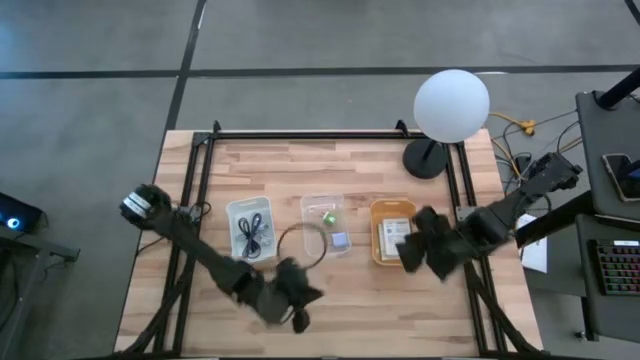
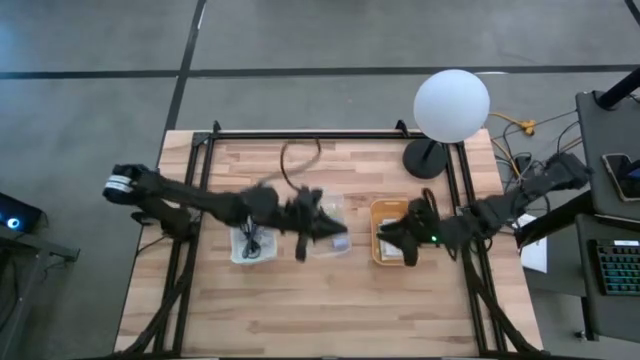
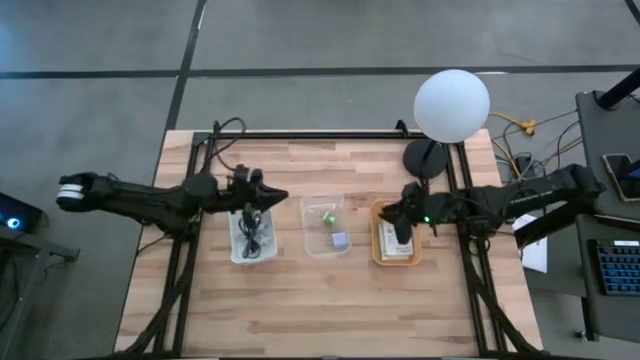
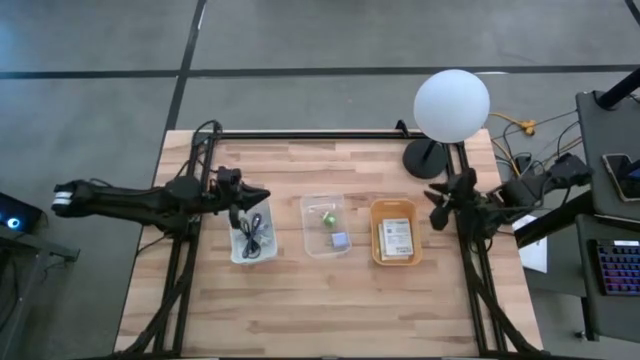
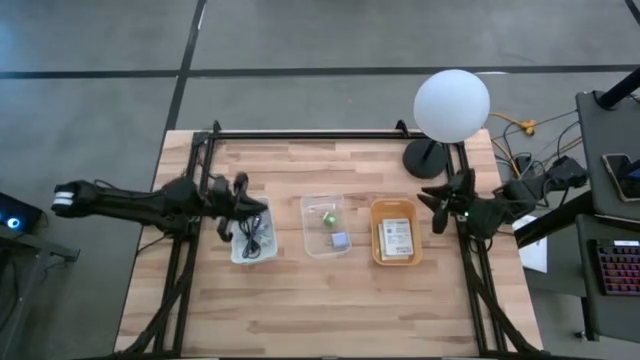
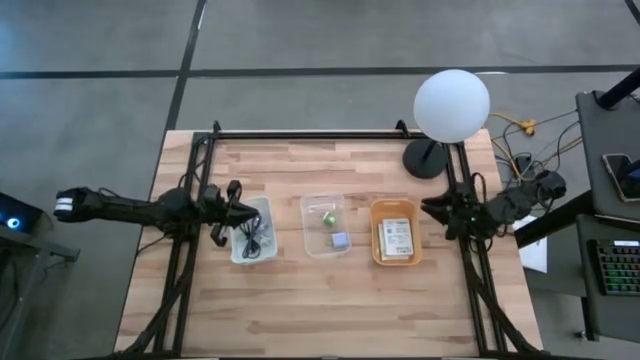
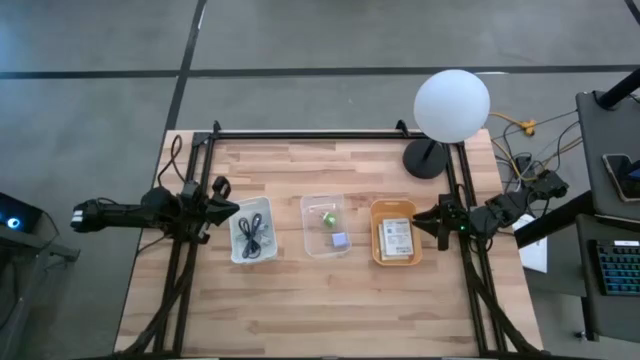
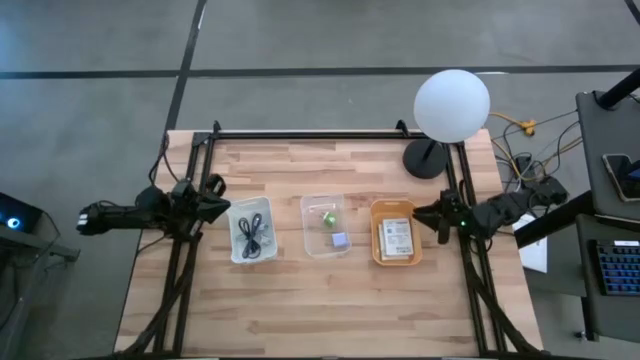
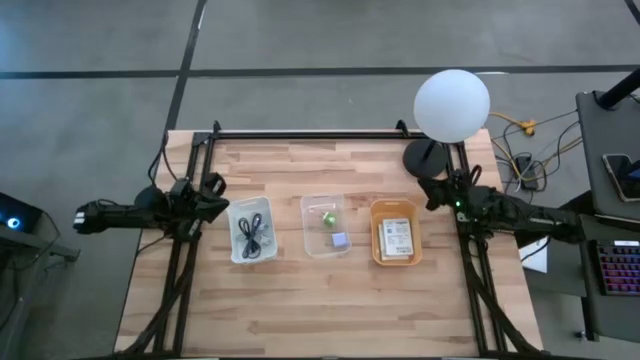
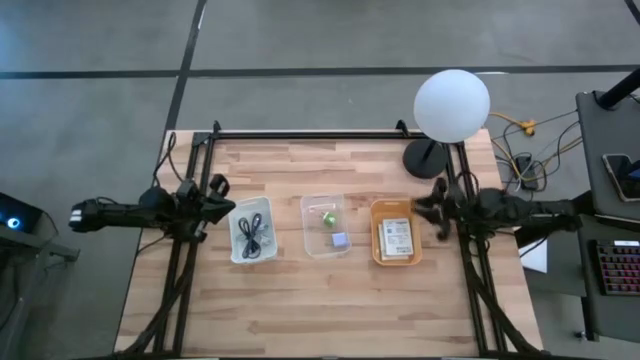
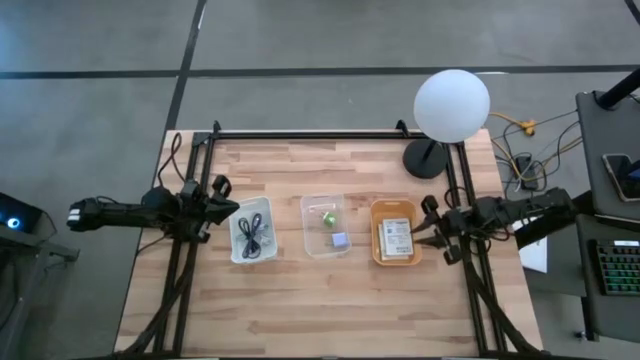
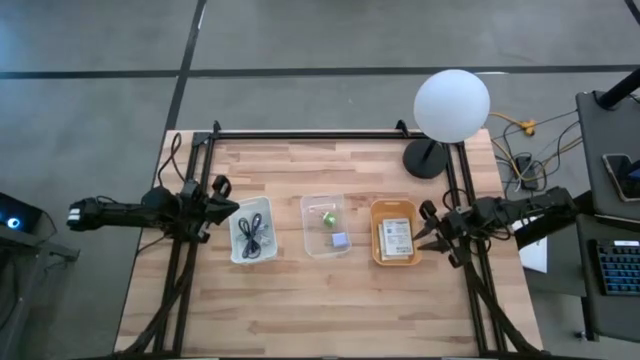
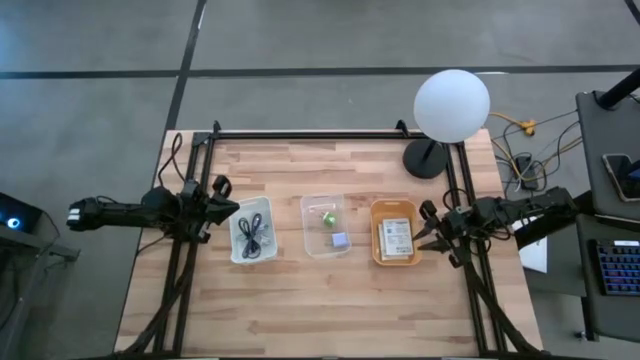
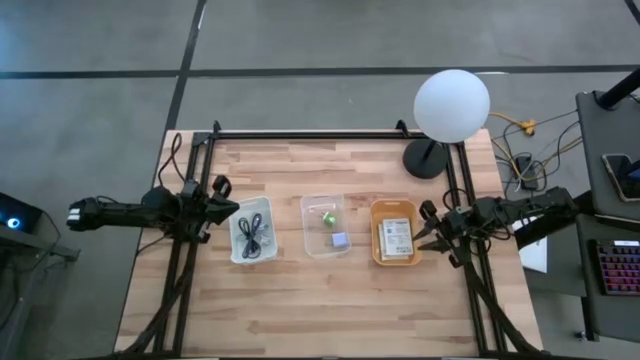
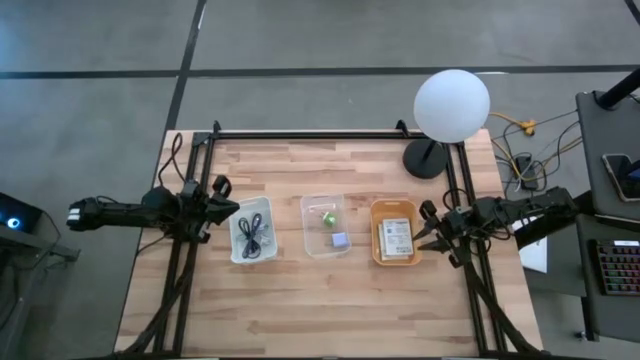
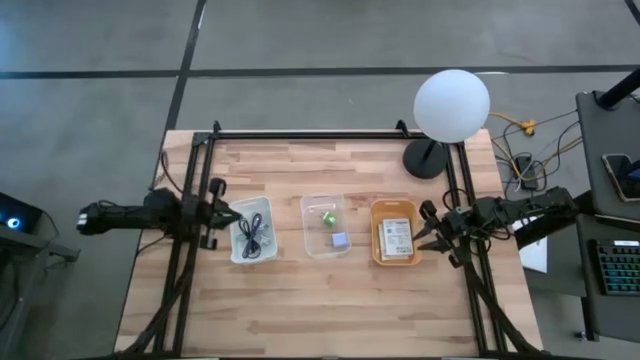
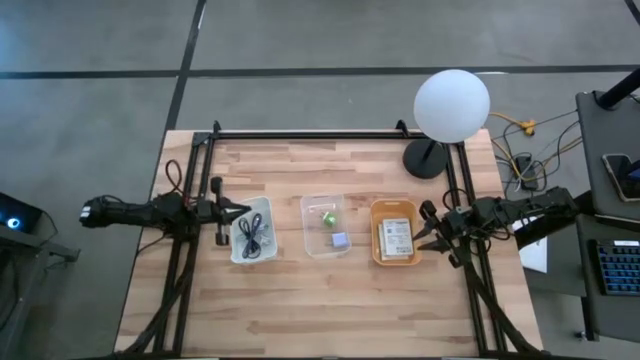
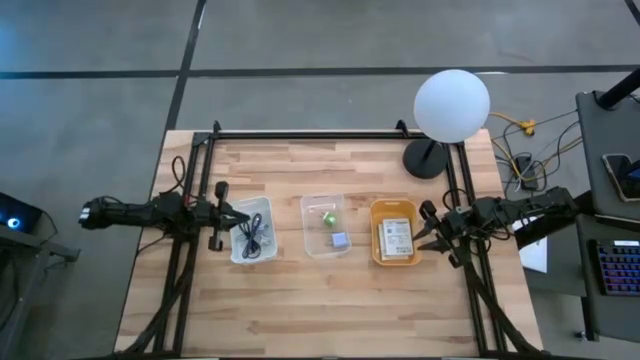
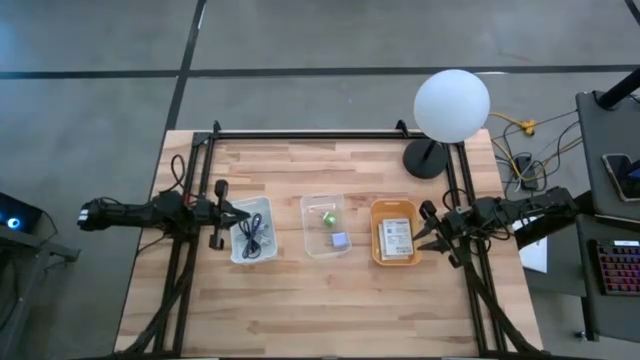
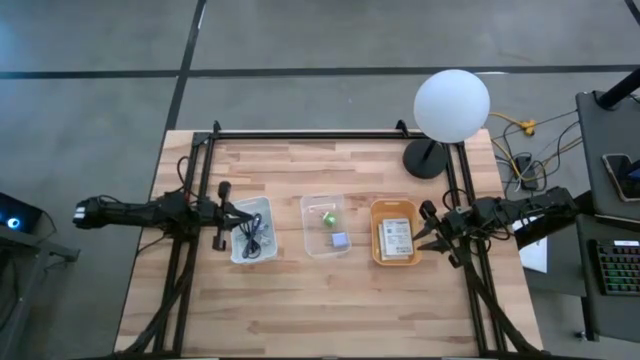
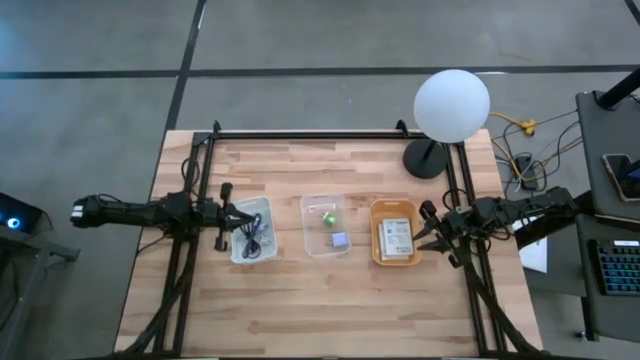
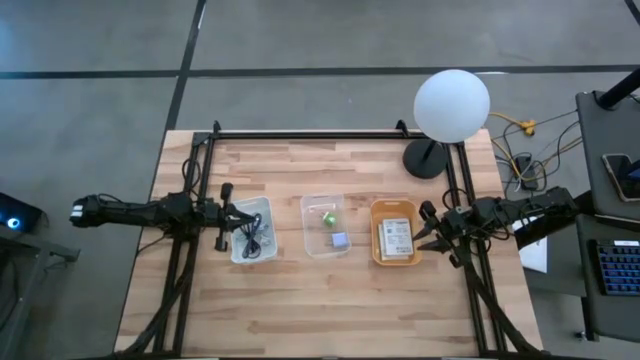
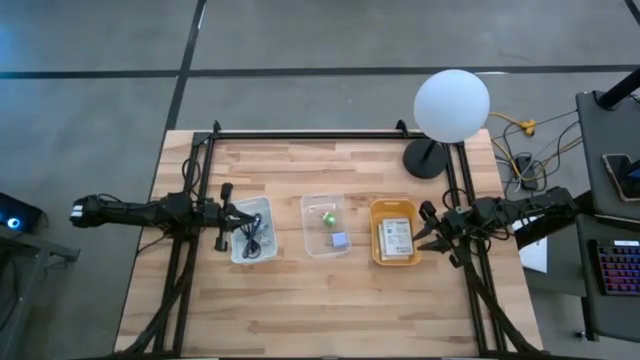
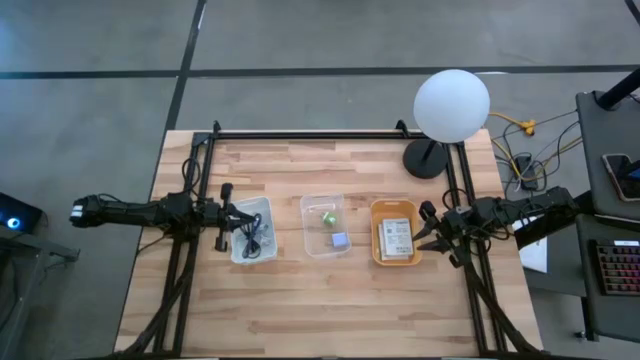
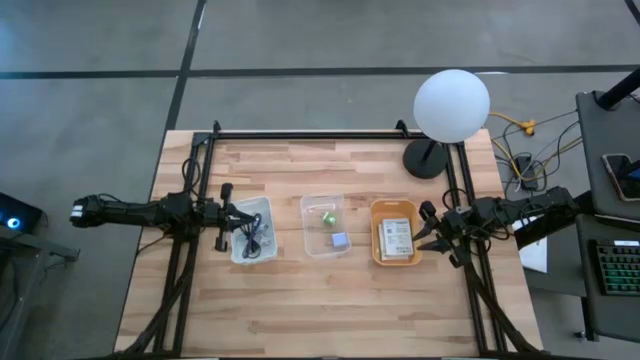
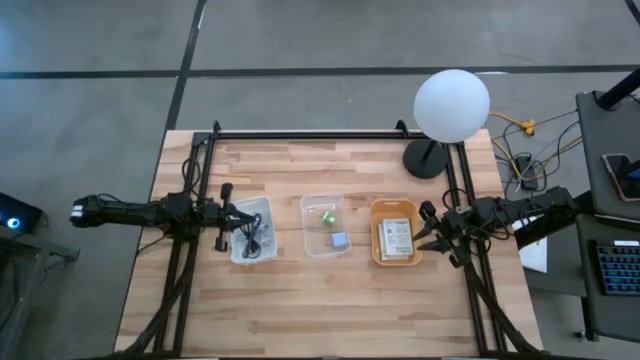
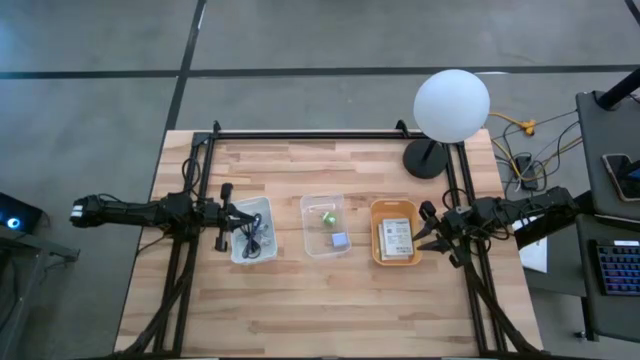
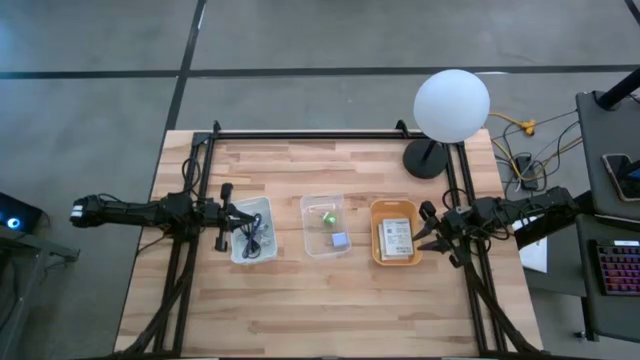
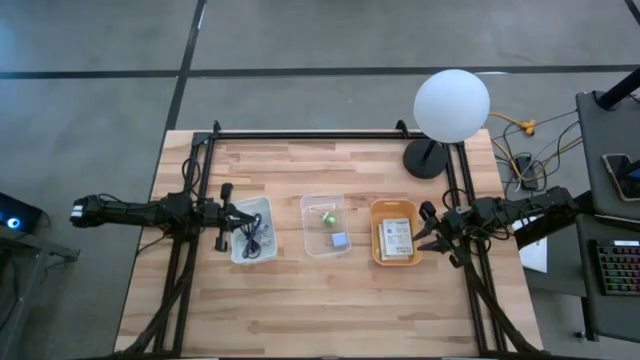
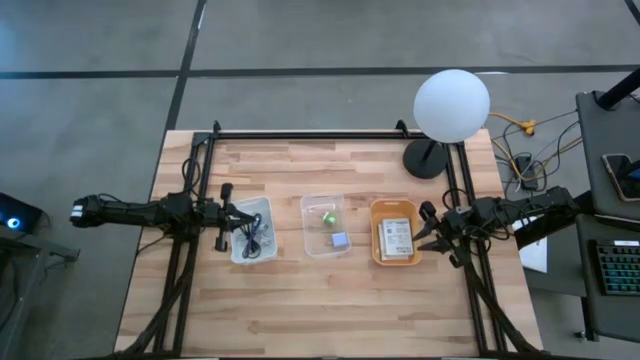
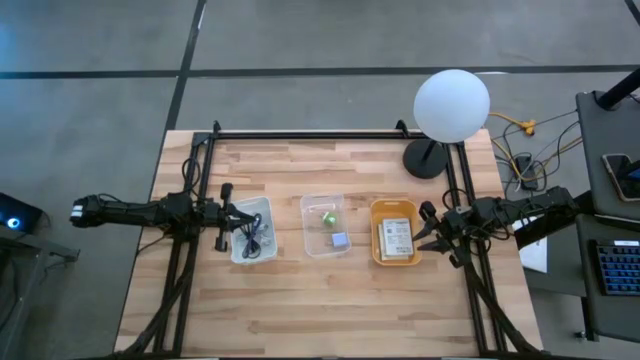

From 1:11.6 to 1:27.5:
Task: Pick and place items into bin
Return to Home Position

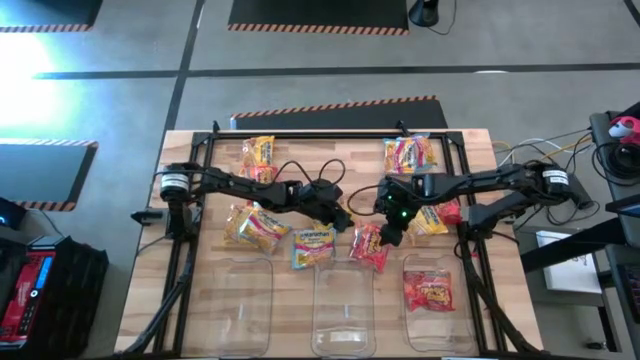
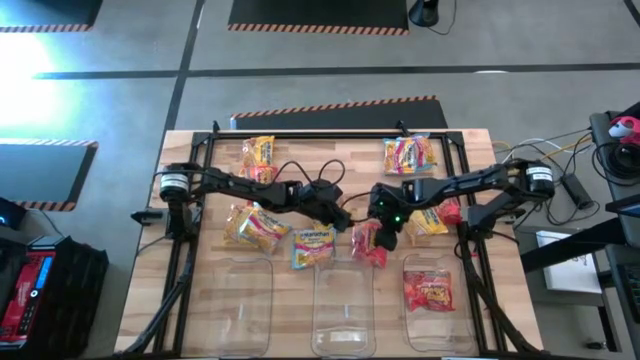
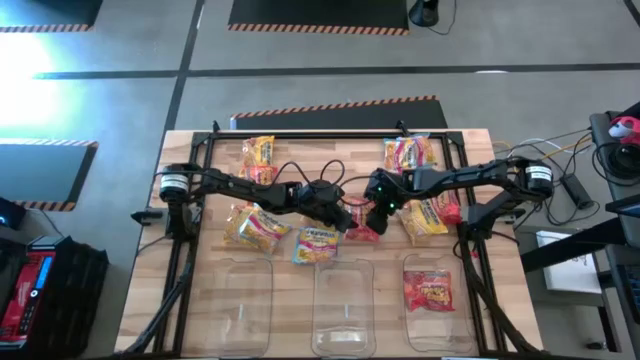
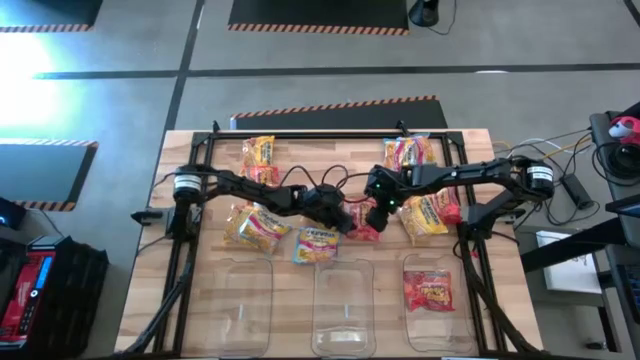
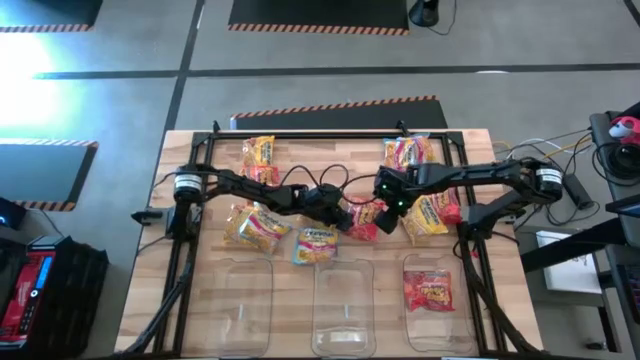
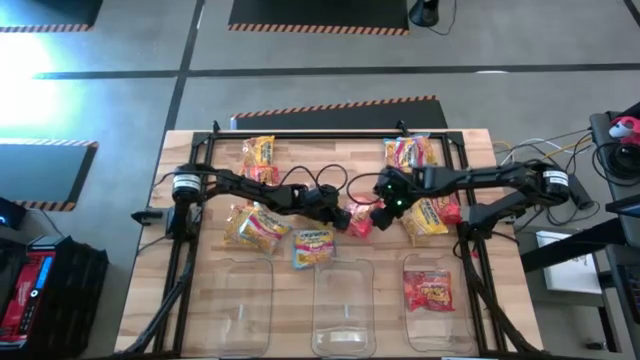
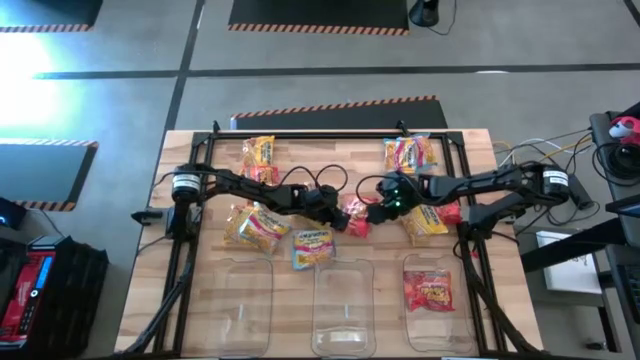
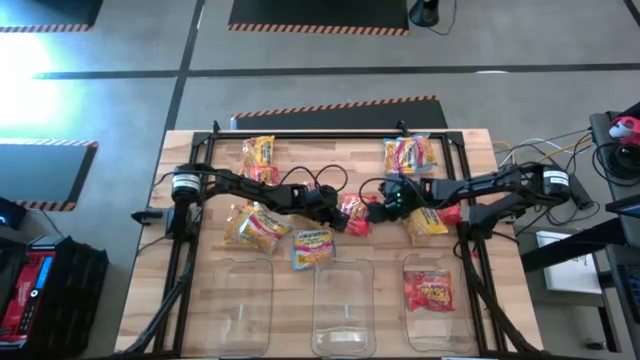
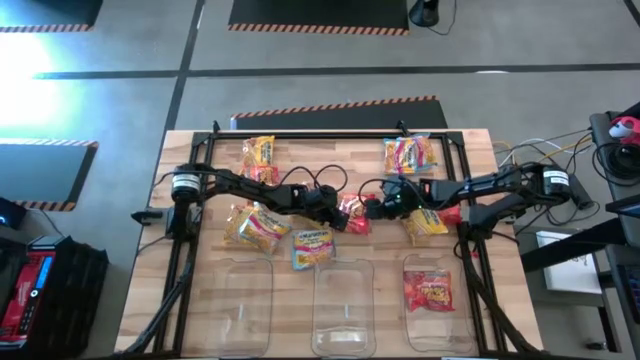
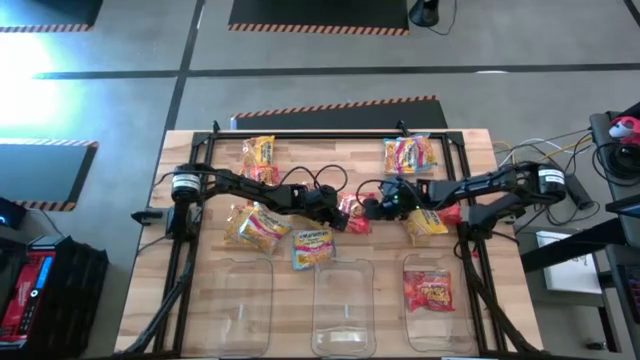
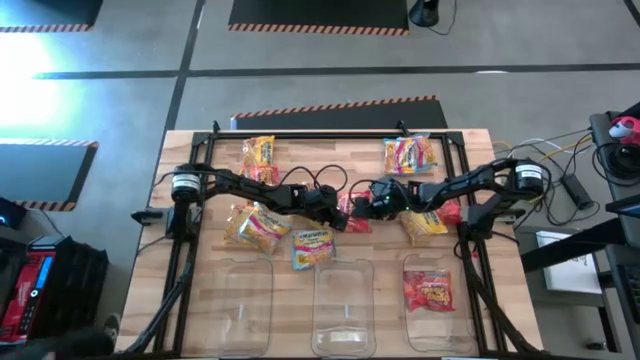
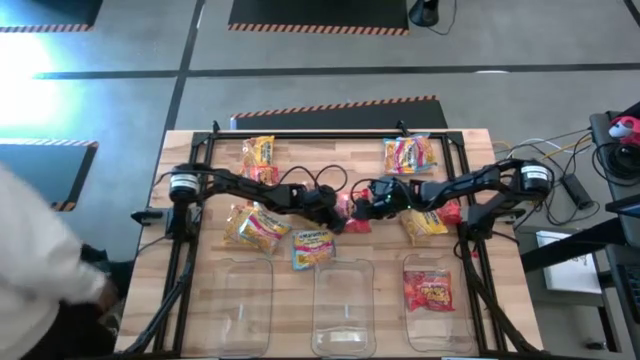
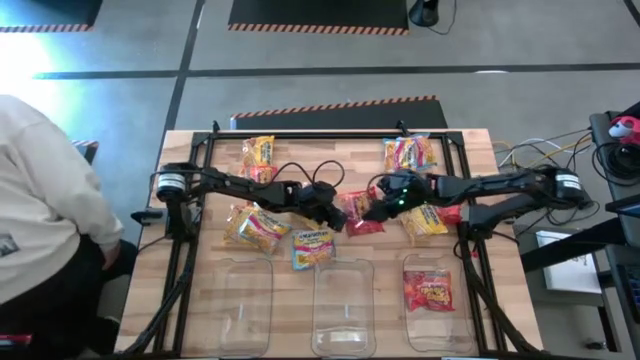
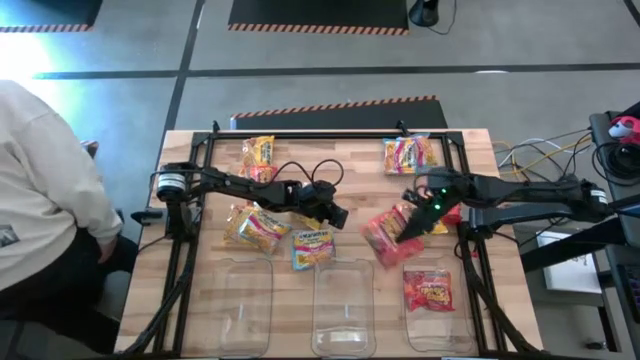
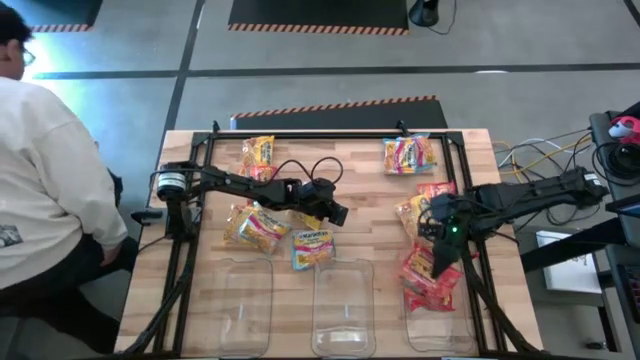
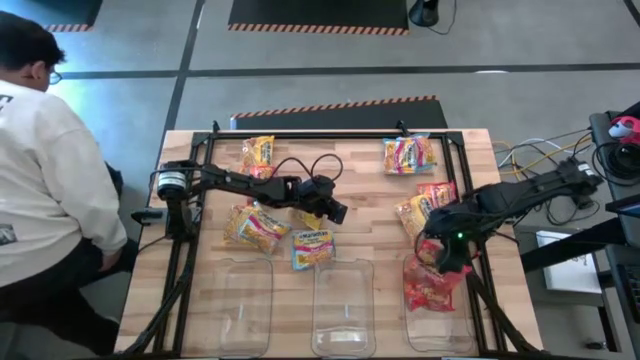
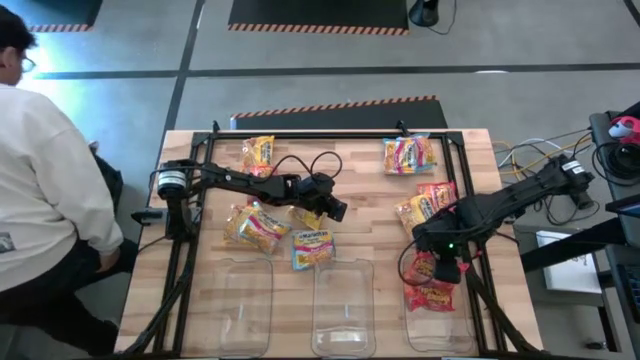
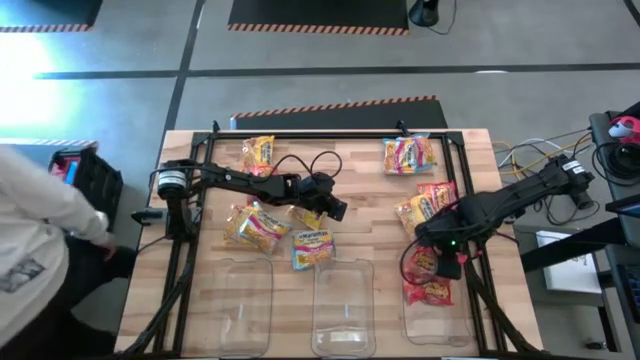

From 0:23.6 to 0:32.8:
Task: Sort Maruchan noodles
Put the orange noodle pack into the right transparent bin
